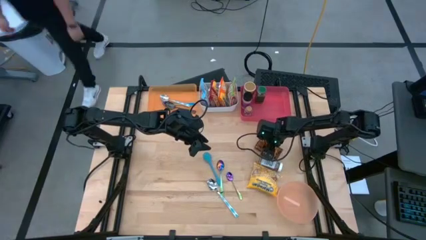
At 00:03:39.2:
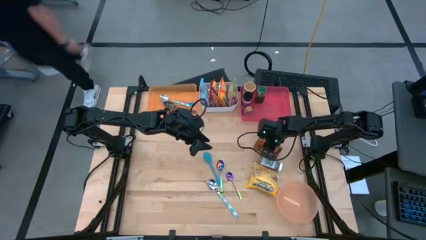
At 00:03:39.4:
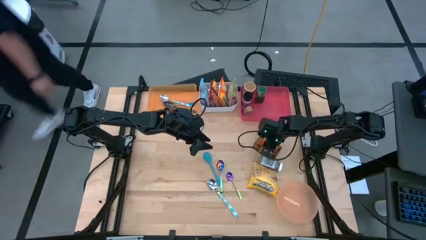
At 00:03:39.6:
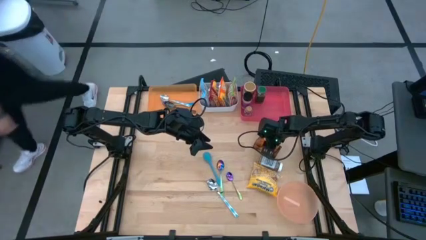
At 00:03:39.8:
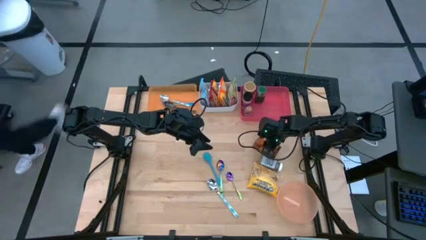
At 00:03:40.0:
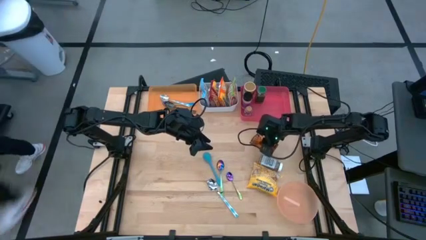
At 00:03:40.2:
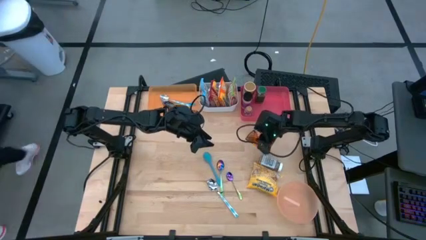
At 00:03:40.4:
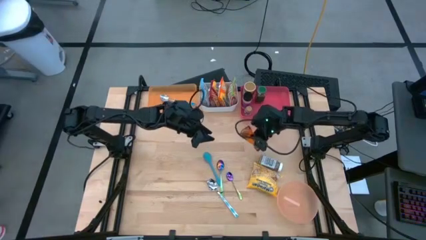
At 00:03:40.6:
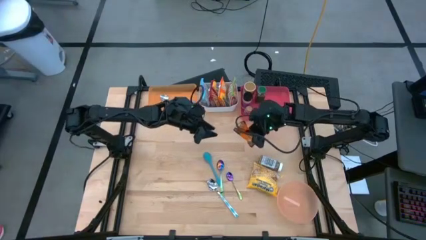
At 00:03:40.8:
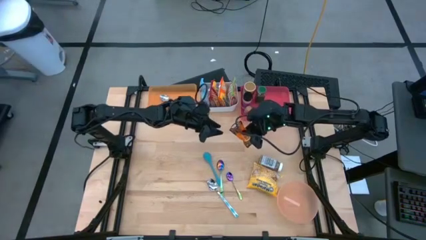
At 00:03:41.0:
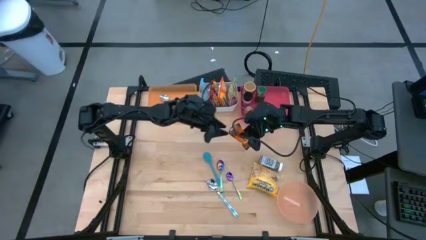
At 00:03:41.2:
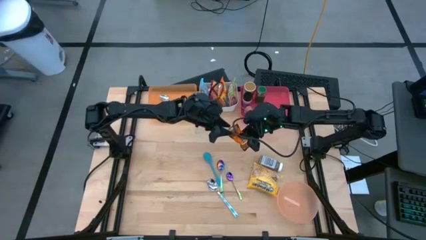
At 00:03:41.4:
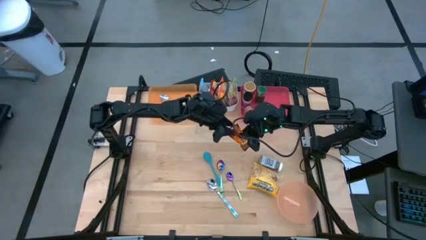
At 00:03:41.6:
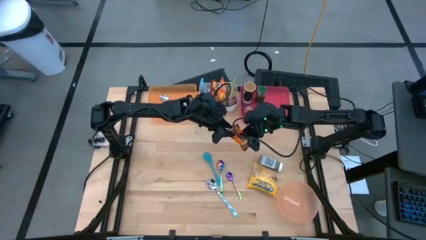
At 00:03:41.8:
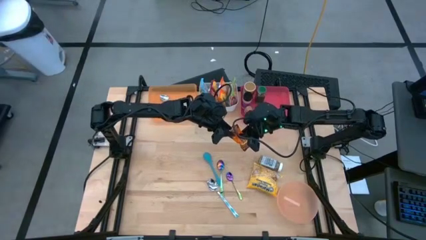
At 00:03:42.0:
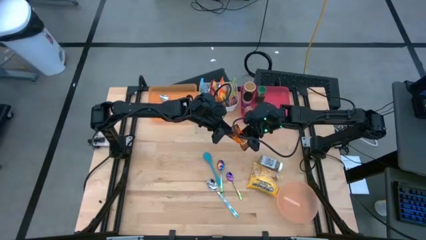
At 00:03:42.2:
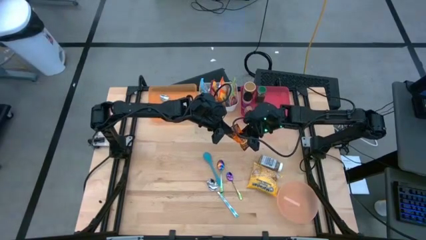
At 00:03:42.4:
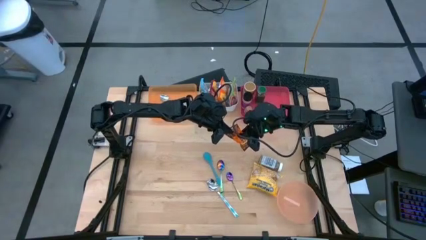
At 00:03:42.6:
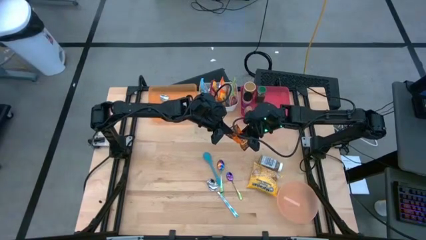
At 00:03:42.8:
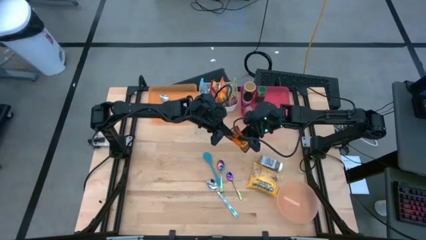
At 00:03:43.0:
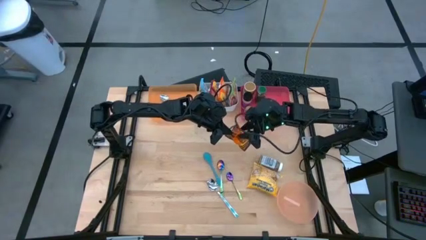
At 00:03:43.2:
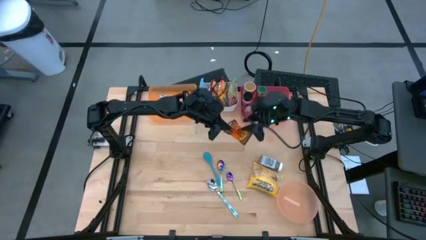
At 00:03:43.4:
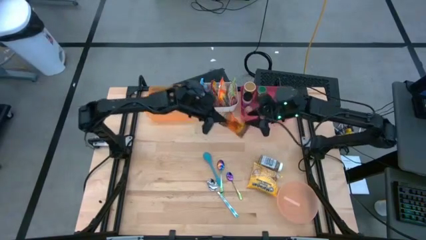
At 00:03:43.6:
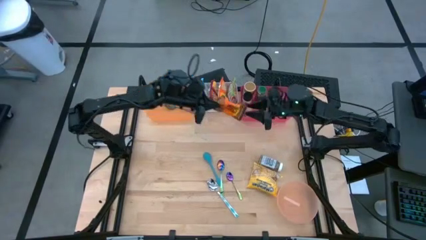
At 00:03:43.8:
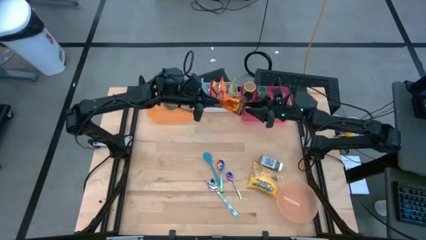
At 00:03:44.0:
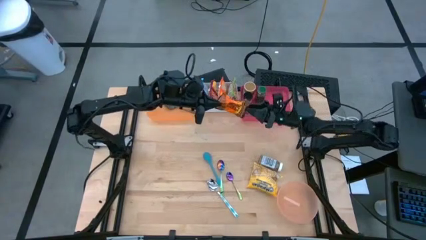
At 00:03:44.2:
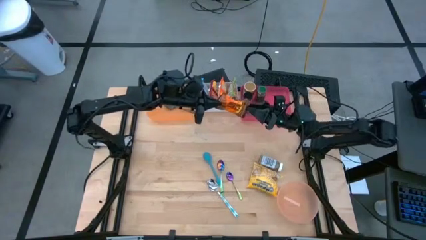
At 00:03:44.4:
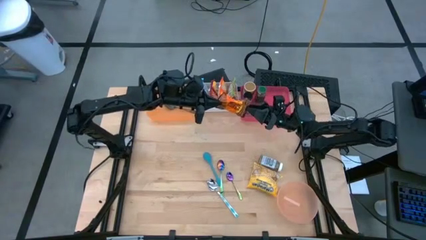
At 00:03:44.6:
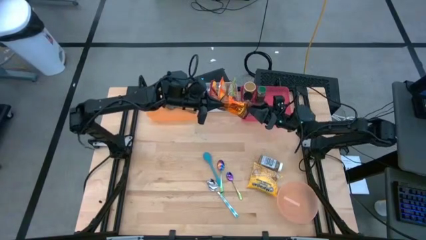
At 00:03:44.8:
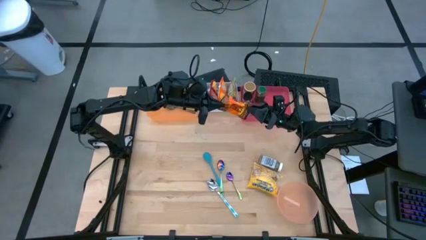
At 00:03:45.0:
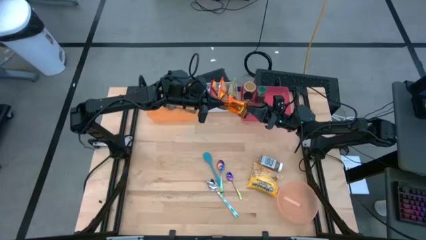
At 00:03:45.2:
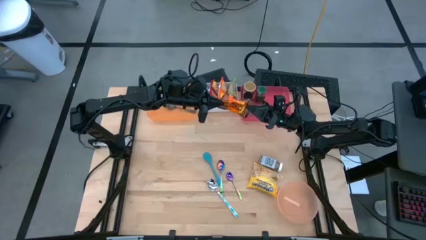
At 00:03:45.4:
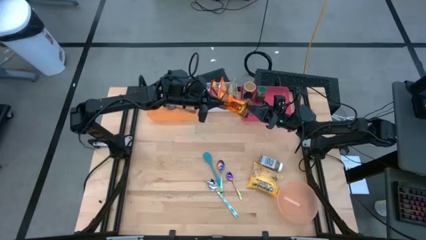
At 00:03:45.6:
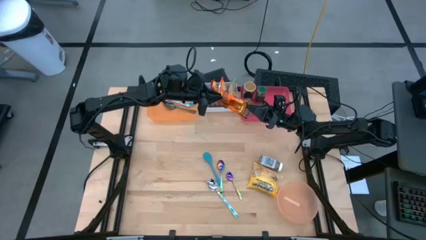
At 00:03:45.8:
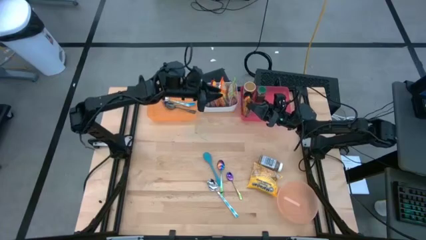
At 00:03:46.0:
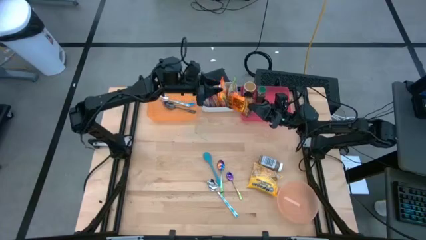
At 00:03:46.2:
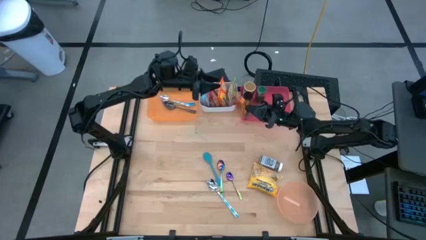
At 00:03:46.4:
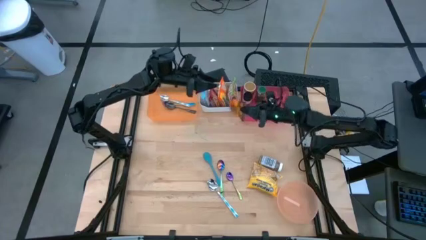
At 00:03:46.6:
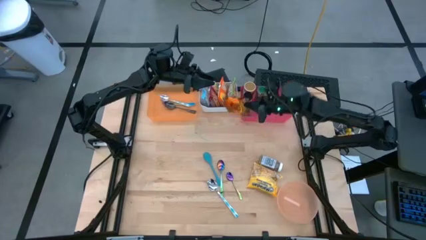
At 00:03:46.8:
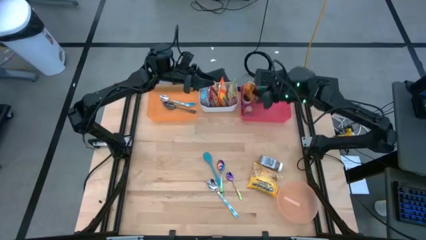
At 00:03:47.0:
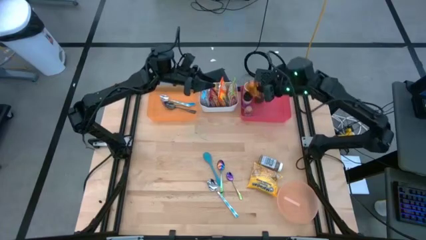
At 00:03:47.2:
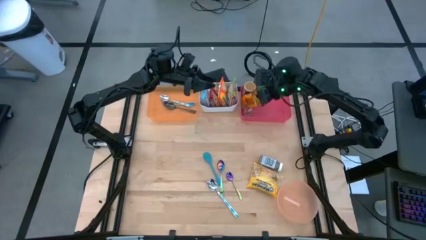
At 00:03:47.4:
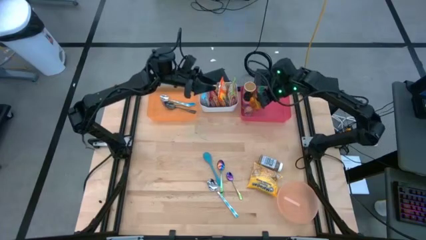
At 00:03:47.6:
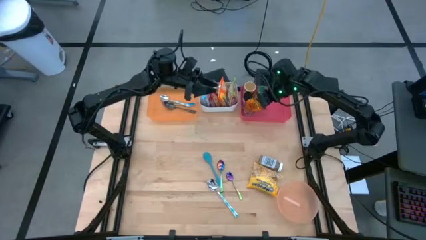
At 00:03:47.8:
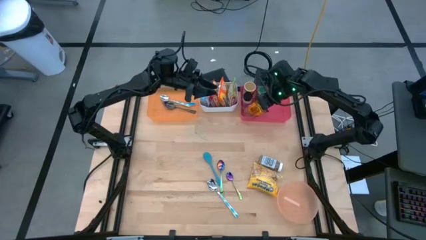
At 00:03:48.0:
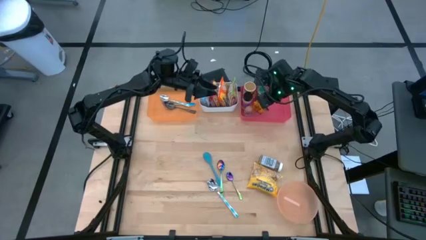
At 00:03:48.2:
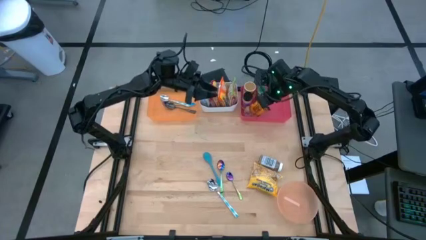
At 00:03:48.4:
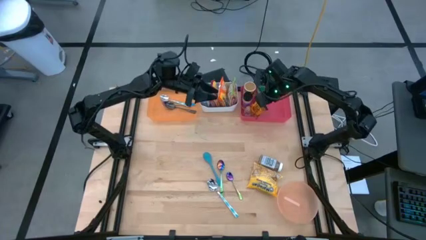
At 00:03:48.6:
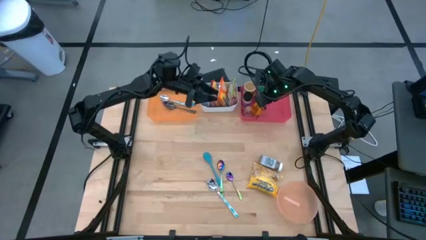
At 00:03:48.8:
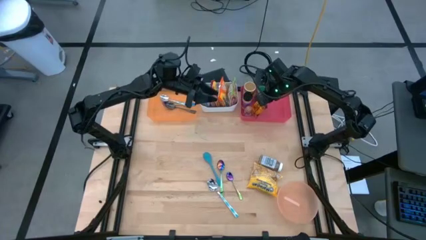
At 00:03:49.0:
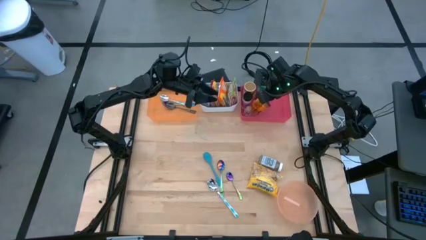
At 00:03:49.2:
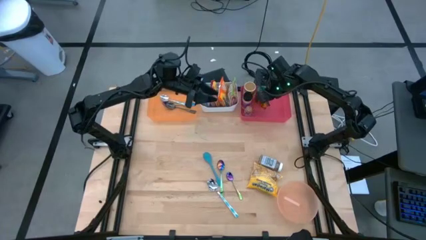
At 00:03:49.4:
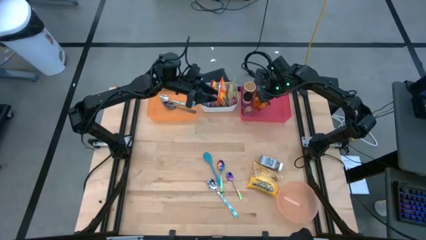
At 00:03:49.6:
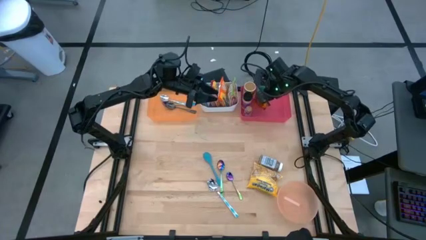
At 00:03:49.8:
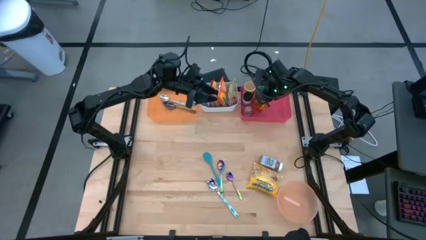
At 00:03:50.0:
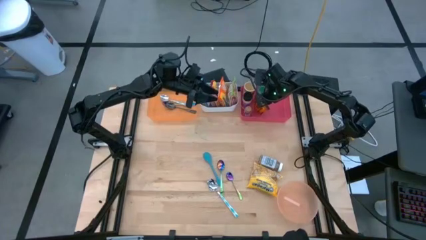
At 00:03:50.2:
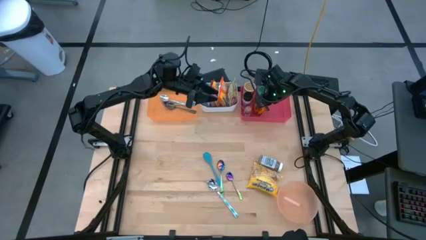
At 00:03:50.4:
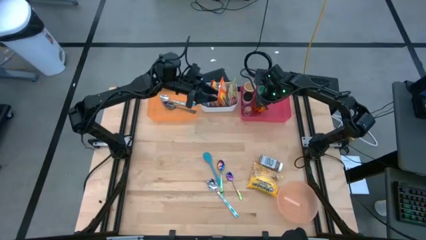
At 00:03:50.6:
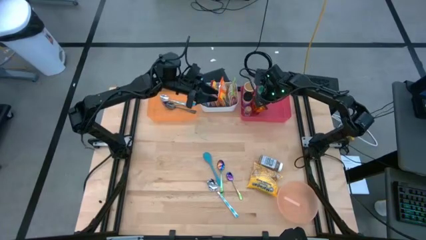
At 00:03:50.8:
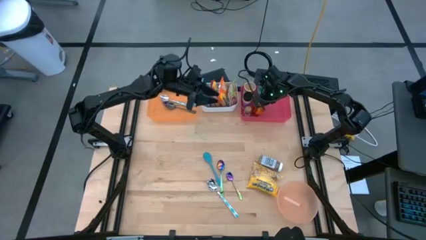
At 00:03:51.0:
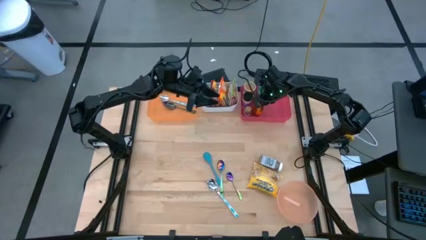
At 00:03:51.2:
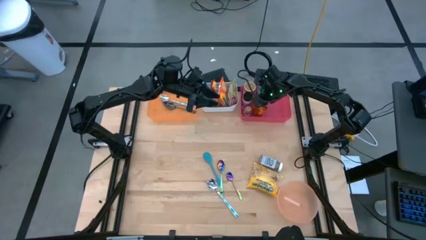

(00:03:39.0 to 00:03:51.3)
Task: Pick & Place Food Item
Put the orange spice bag into the red bin
